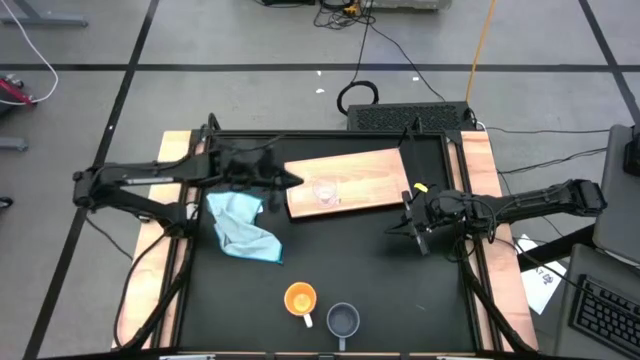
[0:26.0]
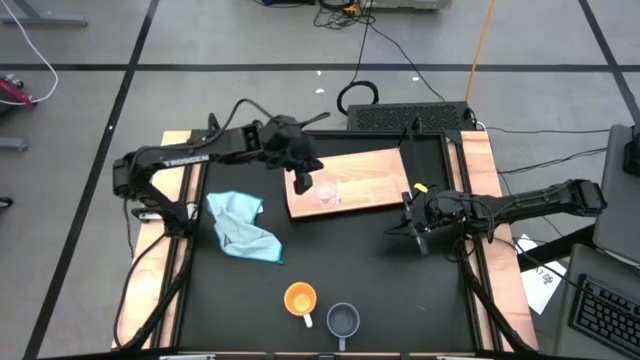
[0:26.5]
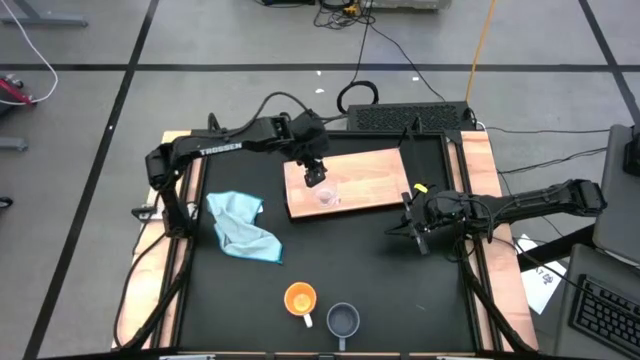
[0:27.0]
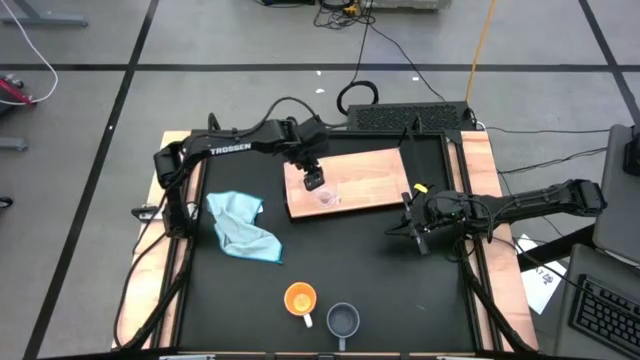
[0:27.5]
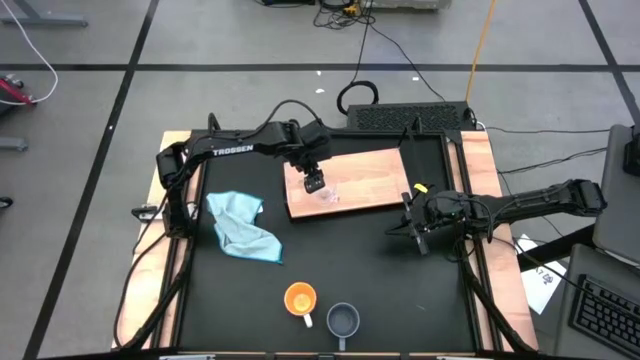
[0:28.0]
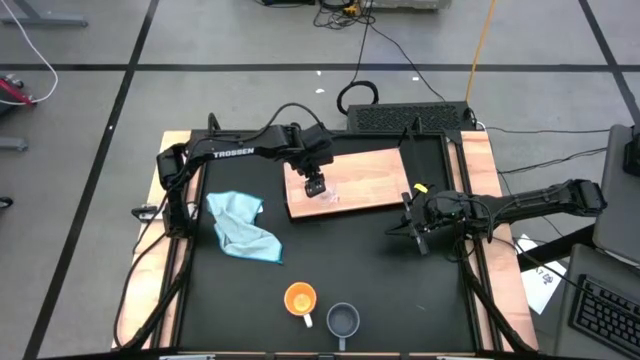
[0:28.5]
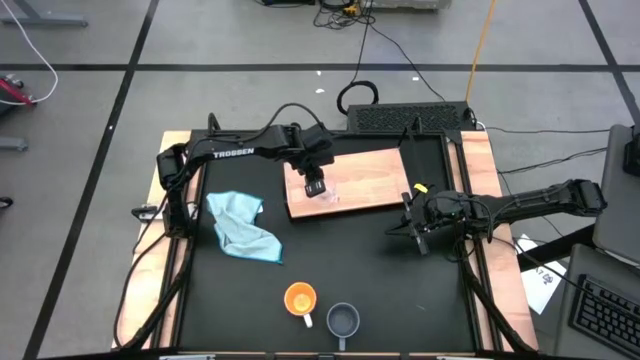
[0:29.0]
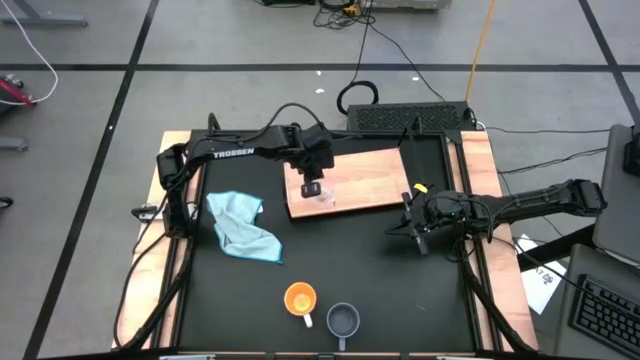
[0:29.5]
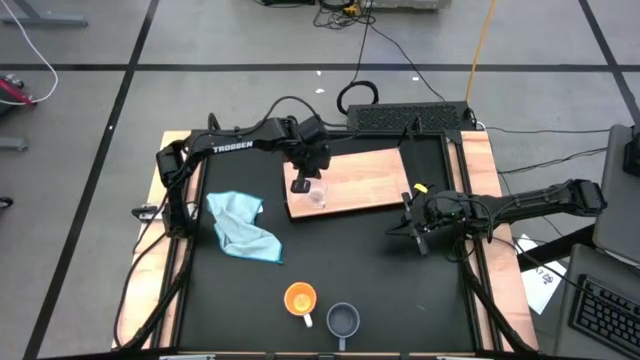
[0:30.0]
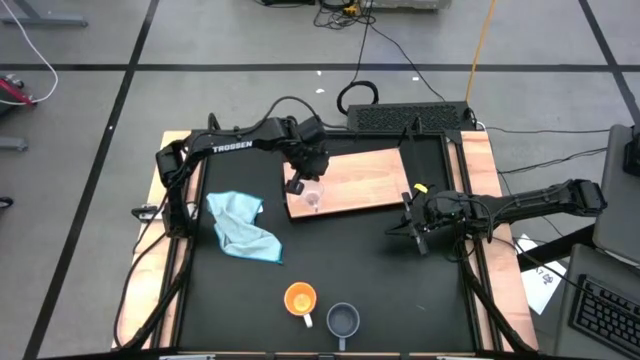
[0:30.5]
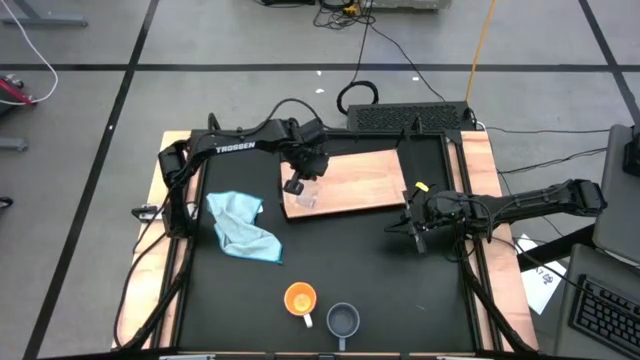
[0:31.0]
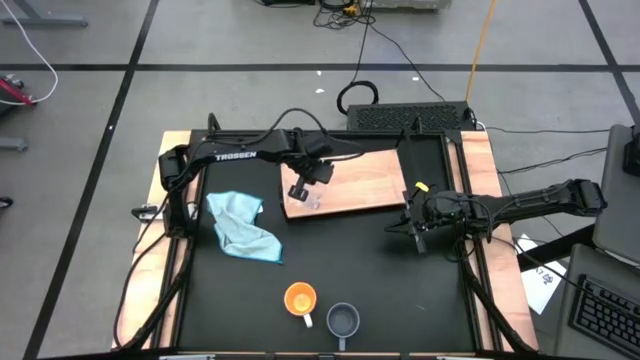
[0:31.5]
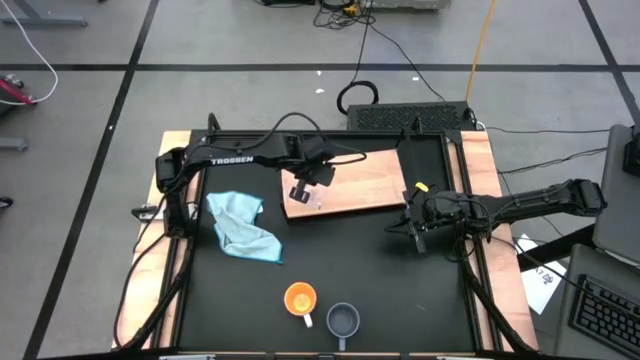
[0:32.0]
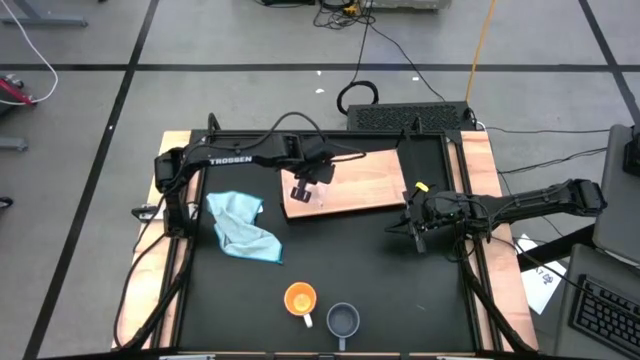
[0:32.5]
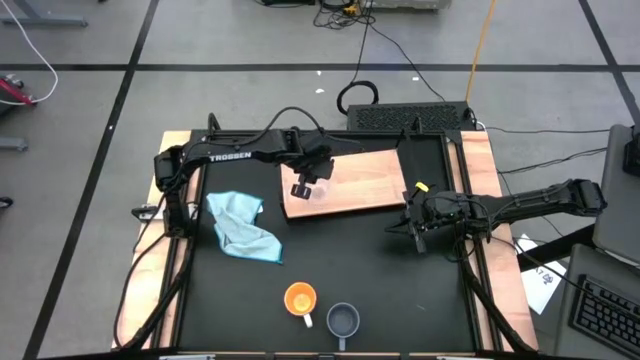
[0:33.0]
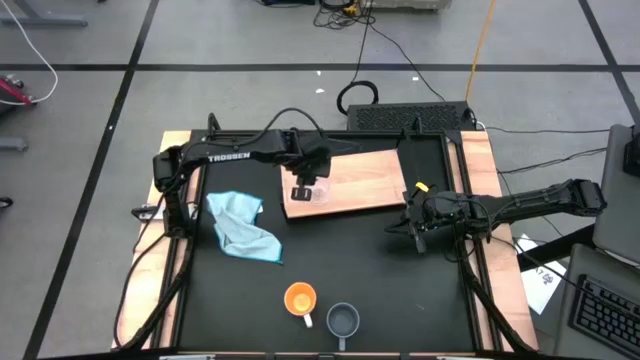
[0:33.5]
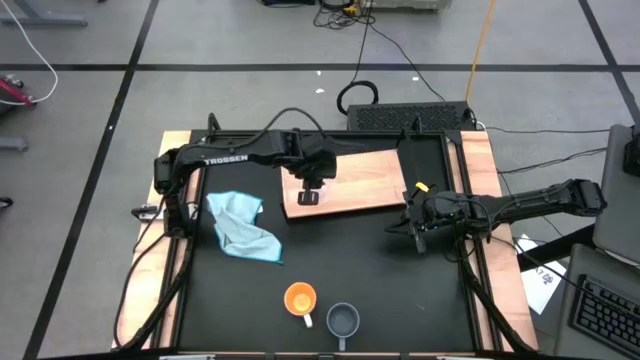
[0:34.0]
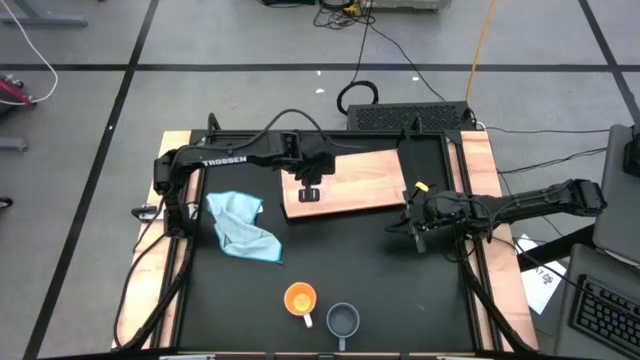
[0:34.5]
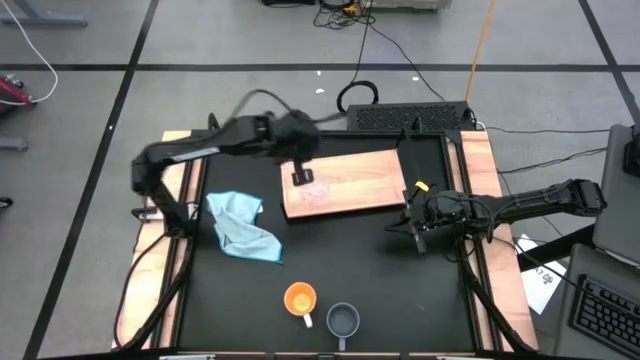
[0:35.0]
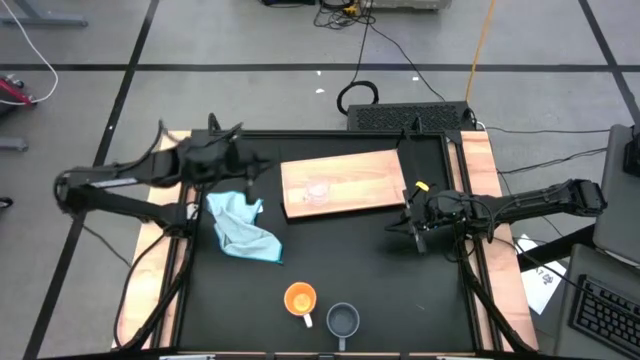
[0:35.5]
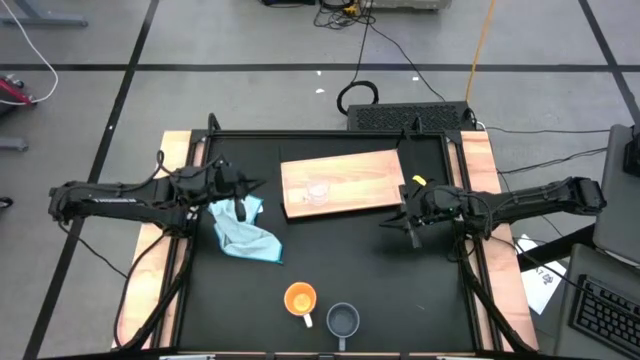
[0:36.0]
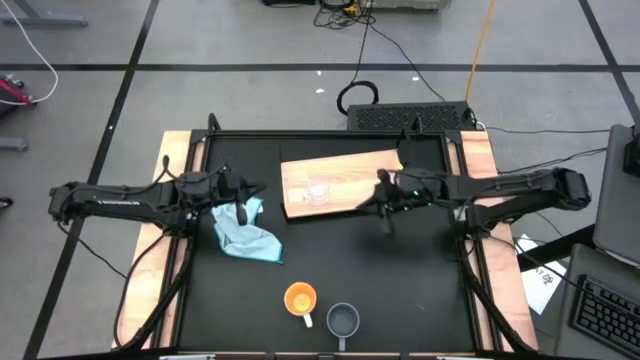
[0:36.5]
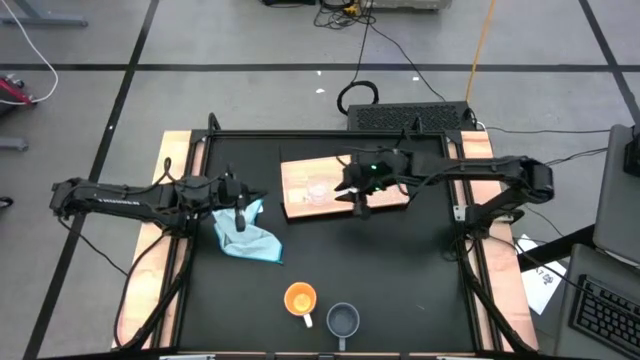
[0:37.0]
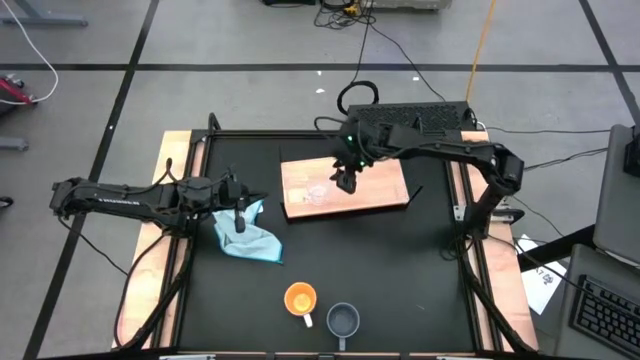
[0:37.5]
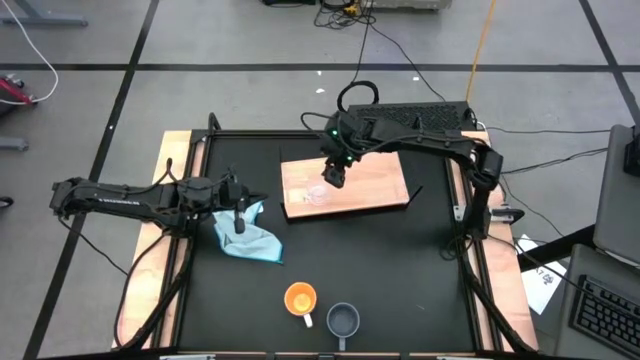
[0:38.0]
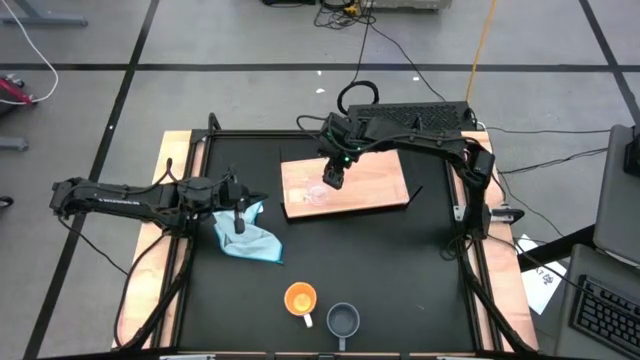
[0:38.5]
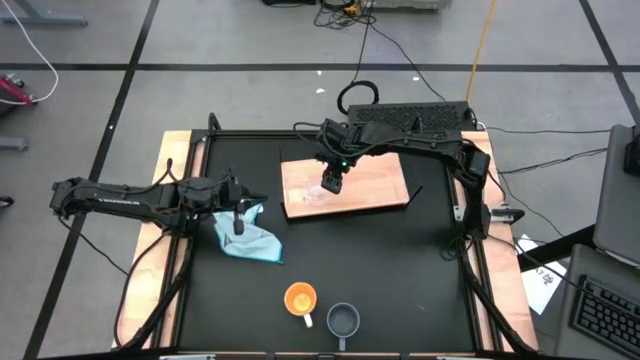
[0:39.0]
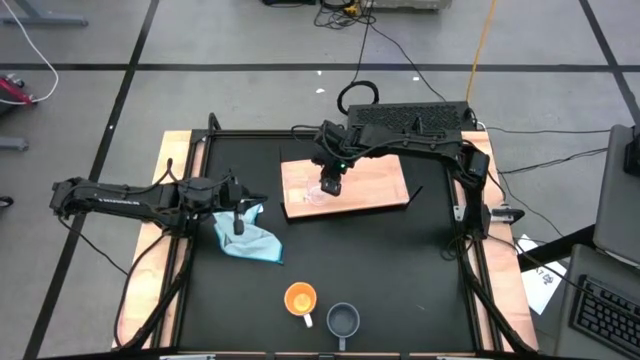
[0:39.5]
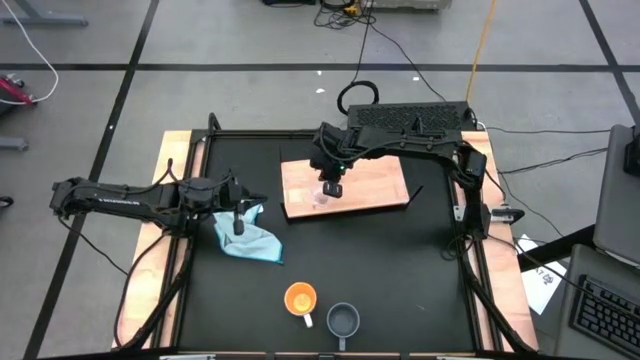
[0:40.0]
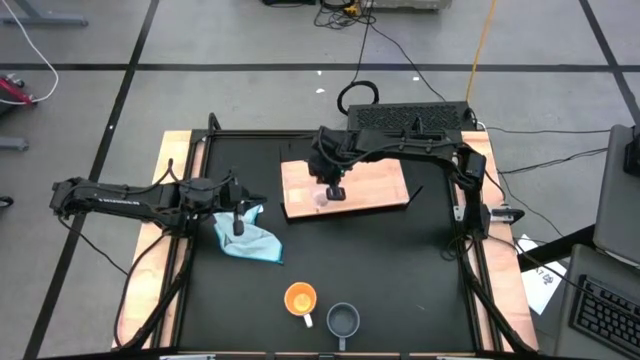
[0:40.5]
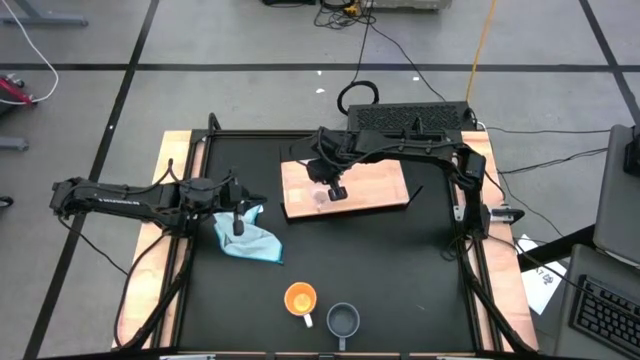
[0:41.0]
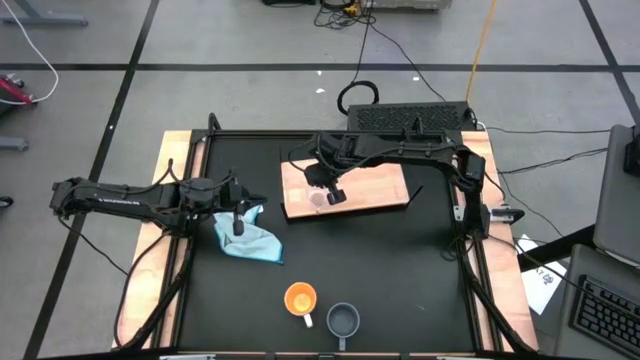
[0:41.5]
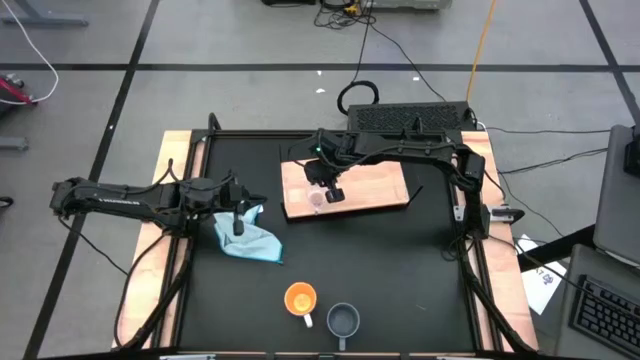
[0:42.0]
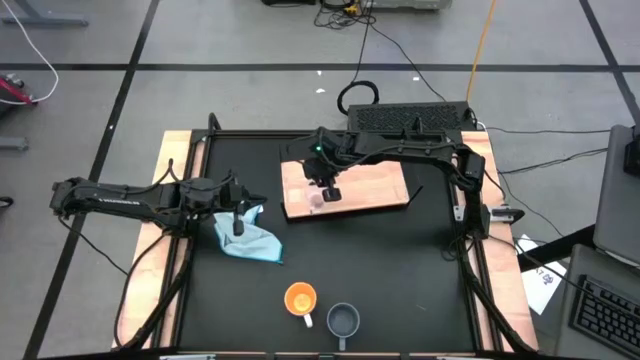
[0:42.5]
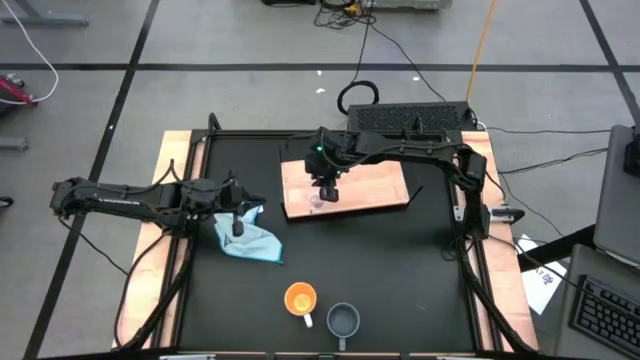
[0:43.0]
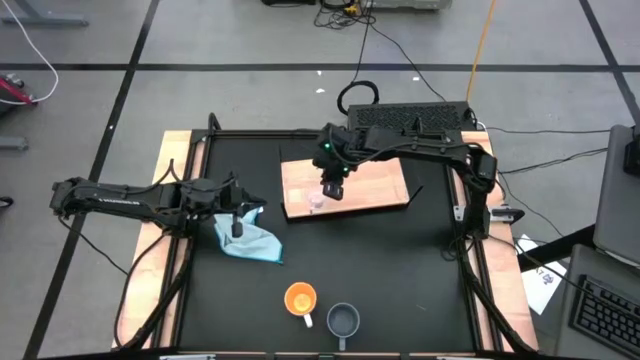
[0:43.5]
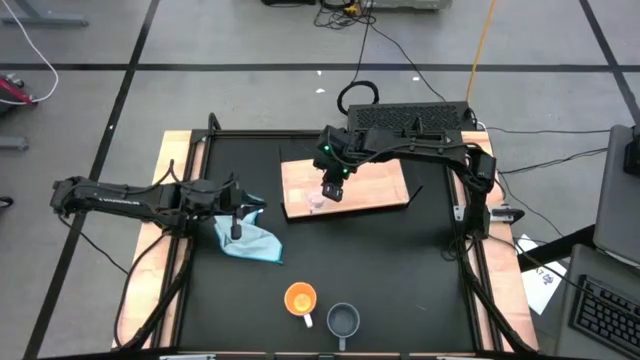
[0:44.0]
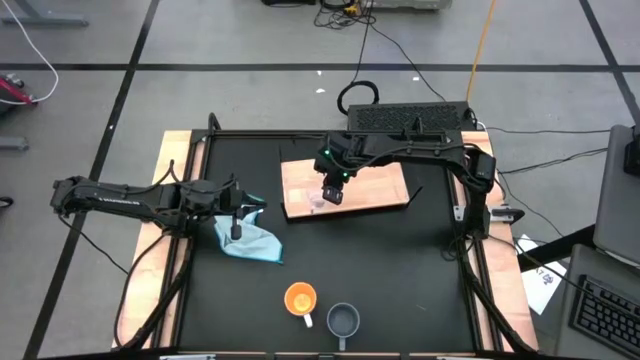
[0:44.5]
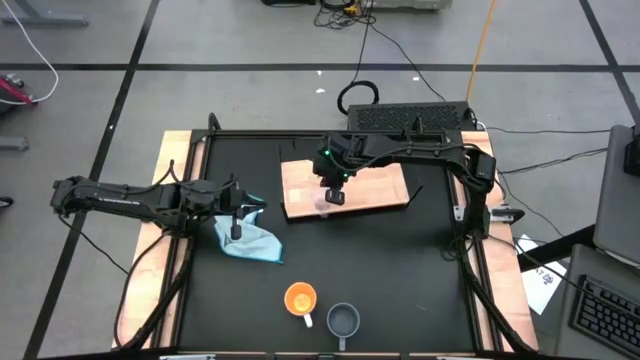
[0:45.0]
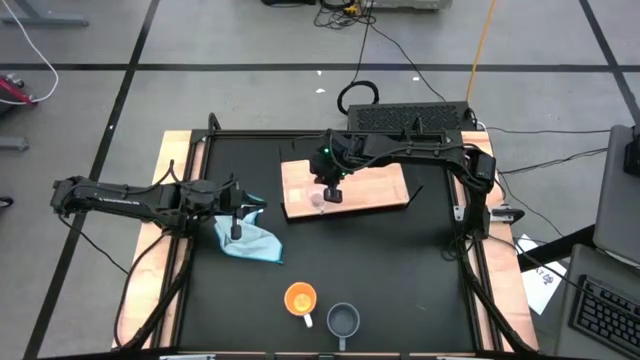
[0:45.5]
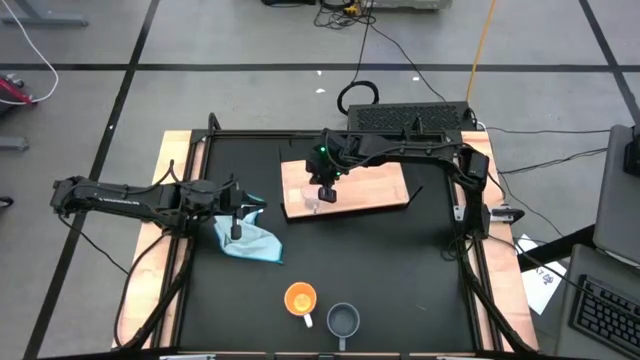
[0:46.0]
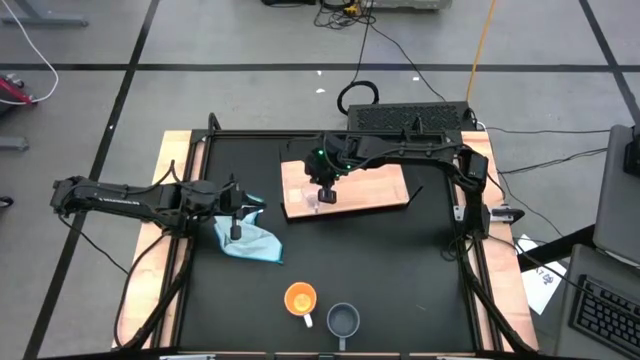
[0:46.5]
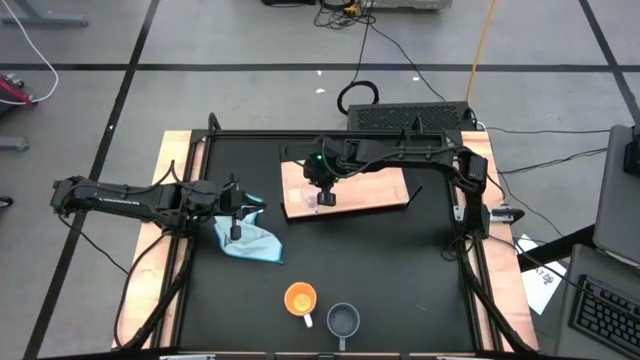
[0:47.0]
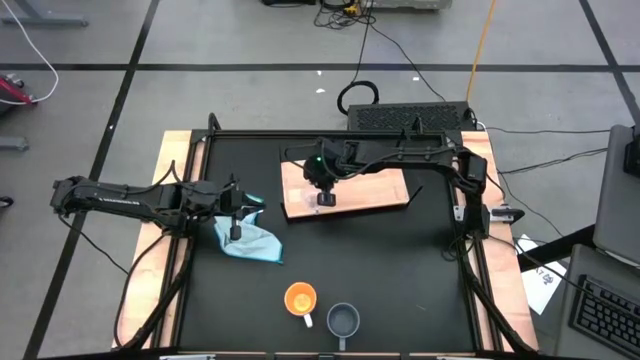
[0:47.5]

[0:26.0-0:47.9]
Task: Stack small to large cups/mugs on shelf
Put the transparent mug on the shelf
